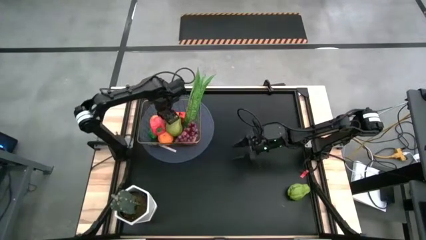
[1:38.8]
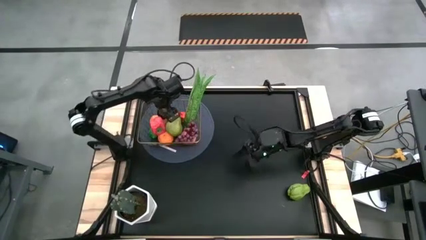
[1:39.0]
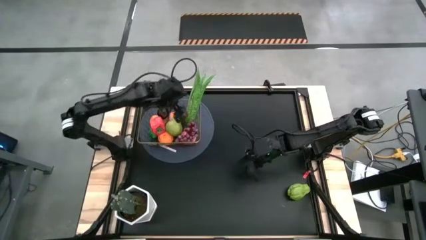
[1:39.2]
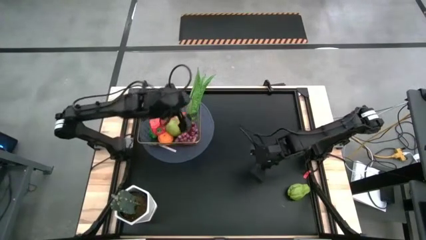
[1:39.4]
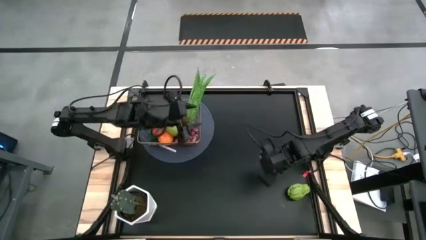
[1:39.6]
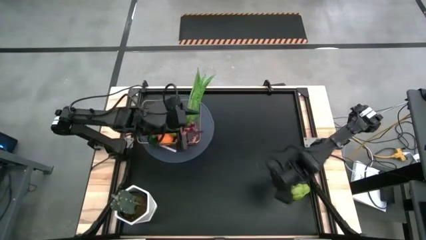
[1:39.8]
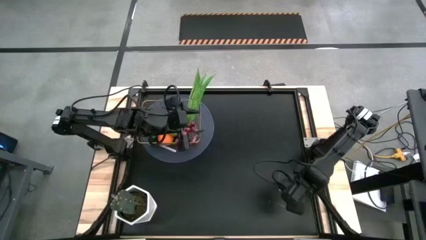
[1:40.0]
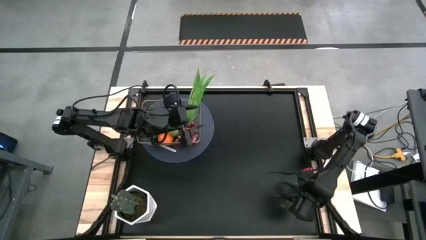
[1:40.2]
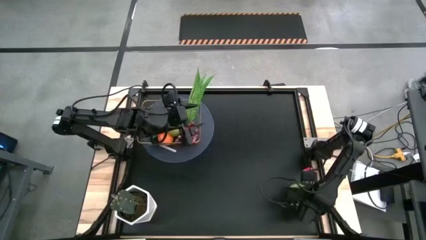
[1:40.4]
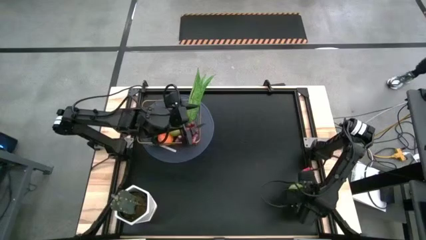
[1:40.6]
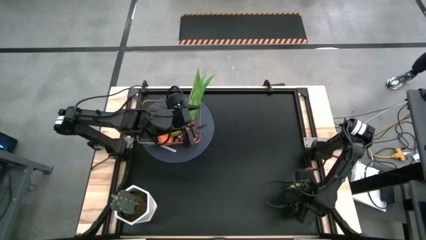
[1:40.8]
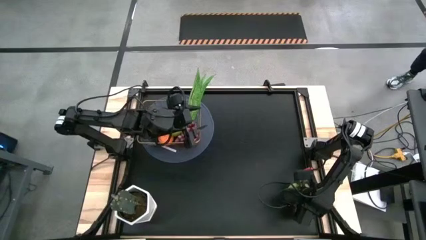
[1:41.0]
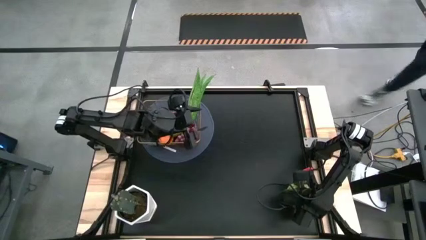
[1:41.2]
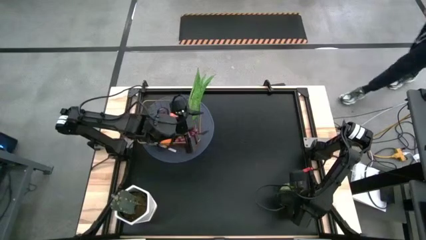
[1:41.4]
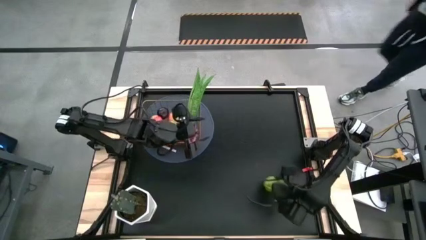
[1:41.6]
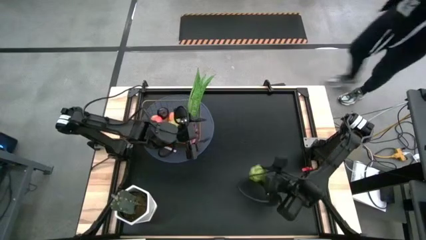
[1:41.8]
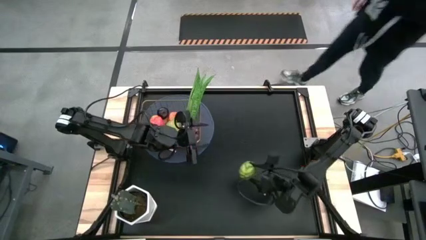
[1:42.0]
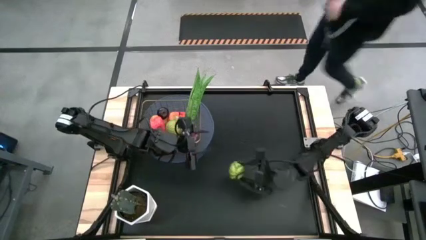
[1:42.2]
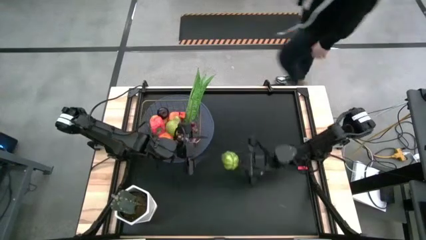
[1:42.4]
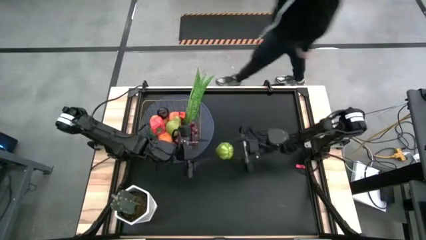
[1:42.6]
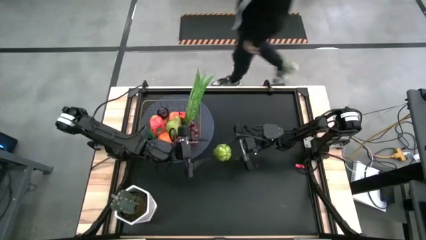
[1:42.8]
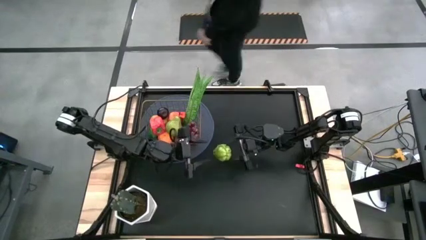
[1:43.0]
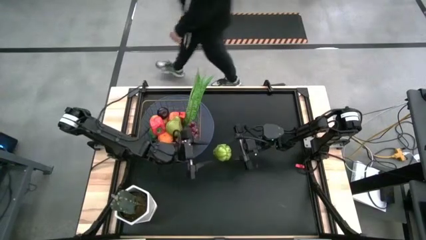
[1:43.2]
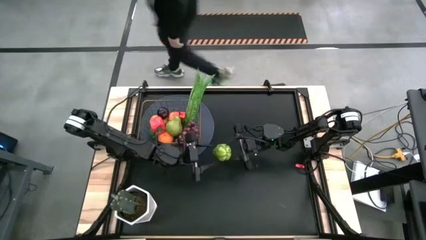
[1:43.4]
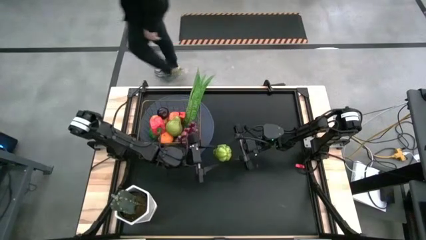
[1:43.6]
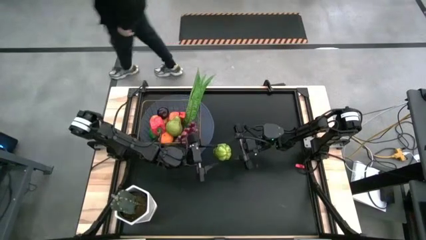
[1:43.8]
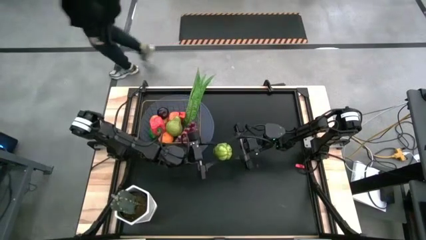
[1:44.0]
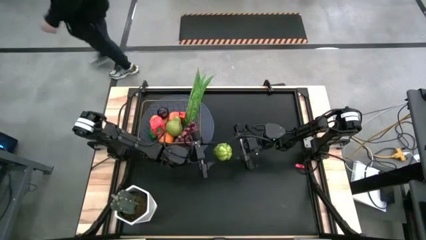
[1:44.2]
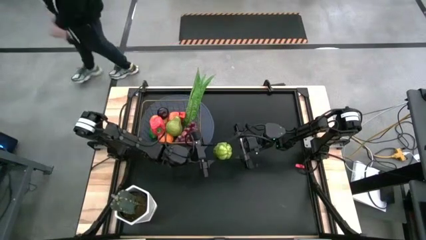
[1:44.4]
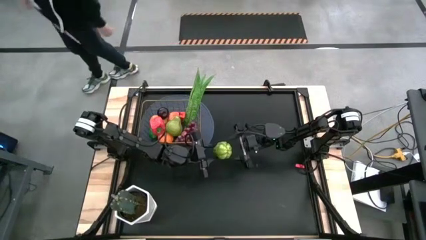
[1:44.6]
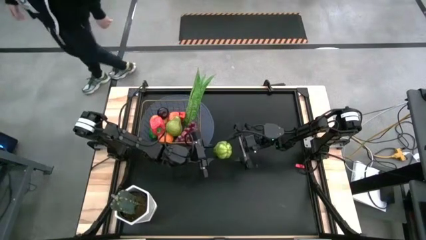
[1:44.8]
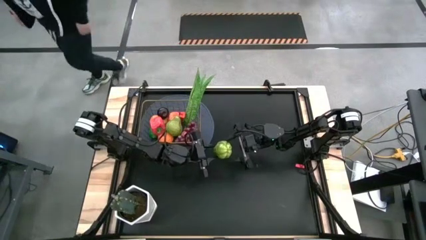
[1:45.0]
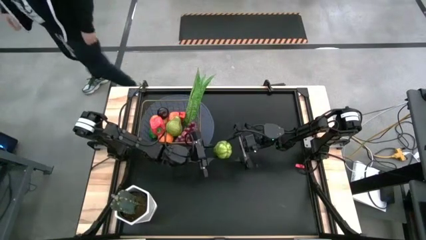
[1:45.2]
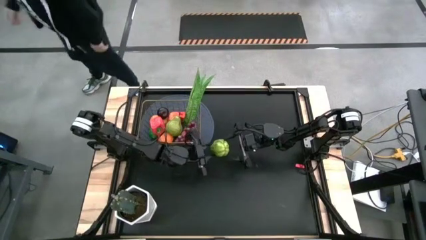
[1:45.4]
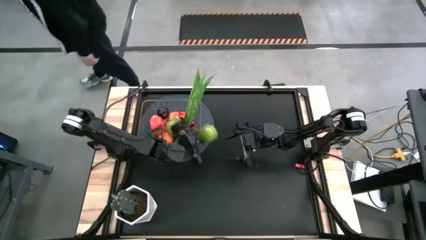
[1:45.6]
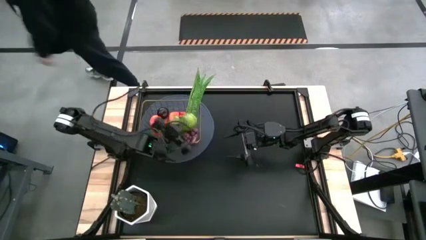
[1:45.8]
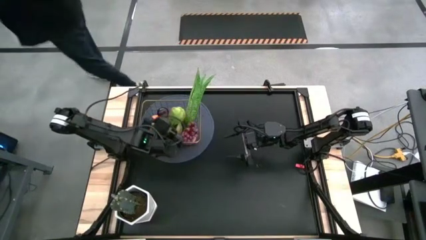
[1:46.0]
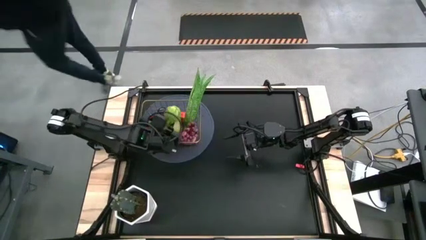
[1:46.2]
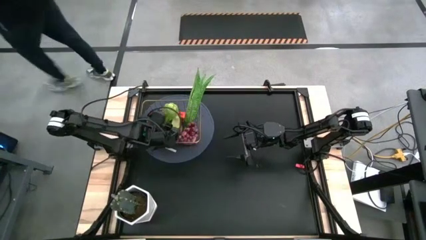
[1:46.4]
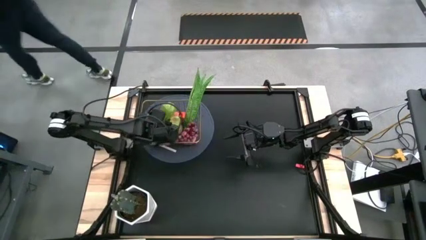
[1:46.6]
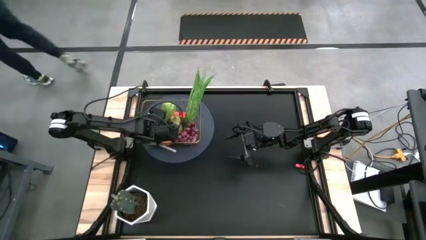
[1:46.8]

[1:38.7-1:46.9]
Task: Build produce basket
Put the green chayote into the wire basket

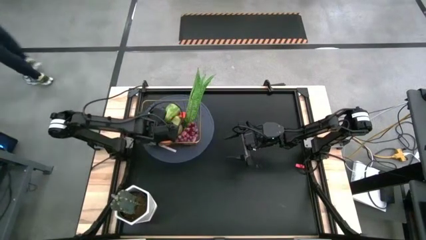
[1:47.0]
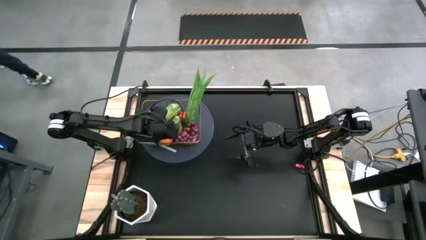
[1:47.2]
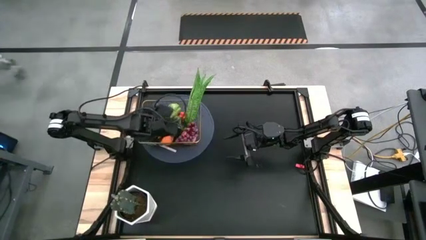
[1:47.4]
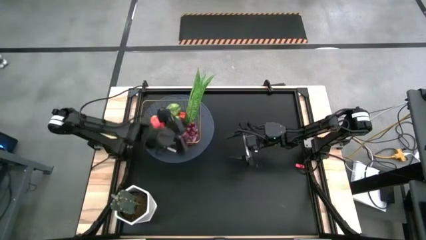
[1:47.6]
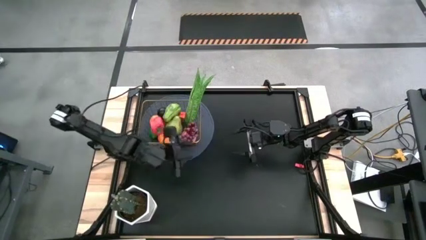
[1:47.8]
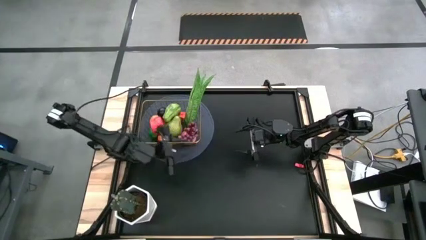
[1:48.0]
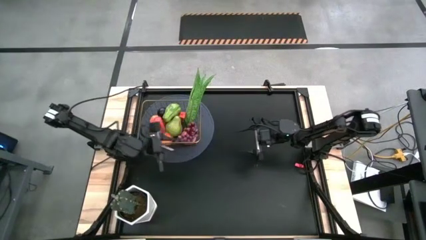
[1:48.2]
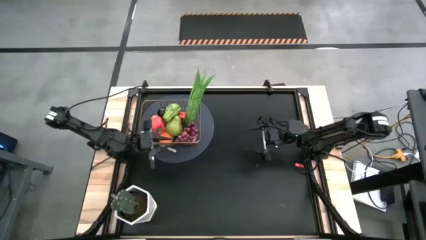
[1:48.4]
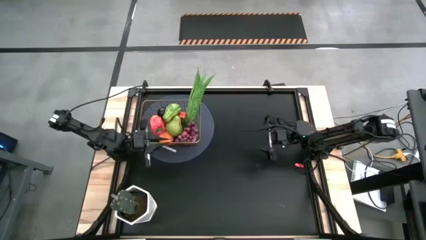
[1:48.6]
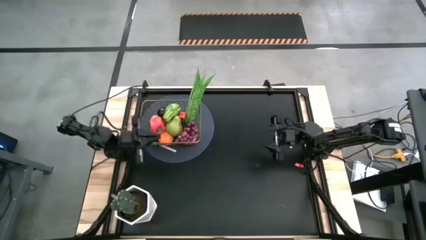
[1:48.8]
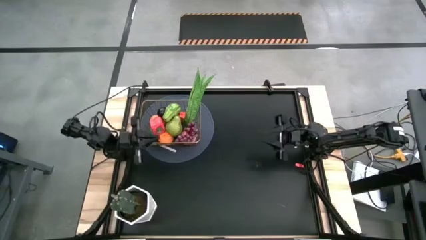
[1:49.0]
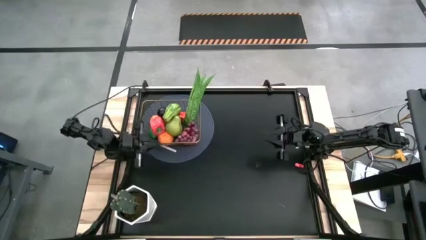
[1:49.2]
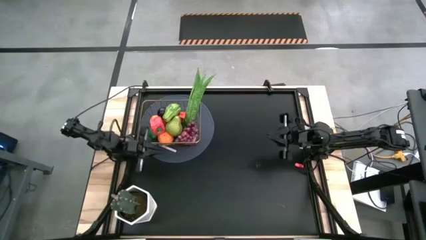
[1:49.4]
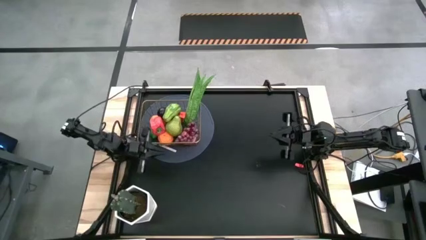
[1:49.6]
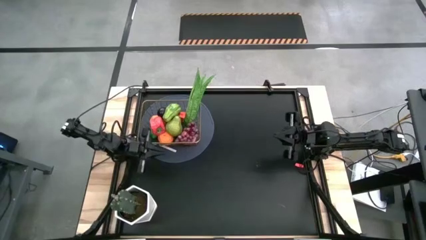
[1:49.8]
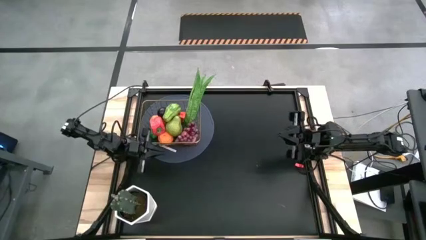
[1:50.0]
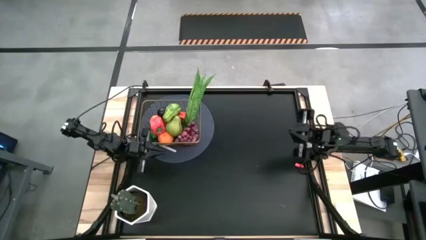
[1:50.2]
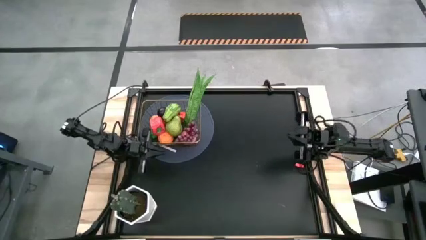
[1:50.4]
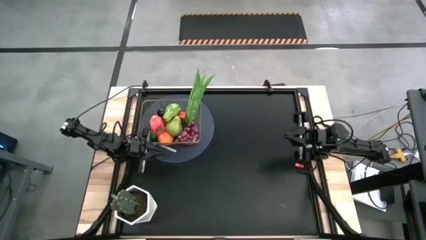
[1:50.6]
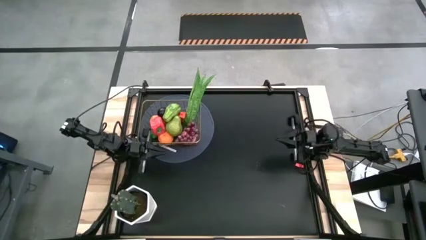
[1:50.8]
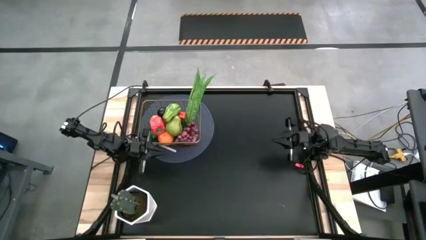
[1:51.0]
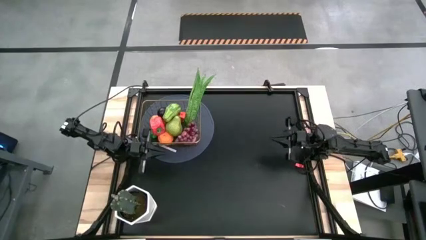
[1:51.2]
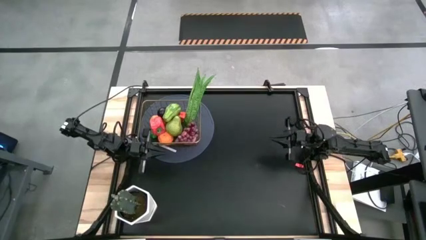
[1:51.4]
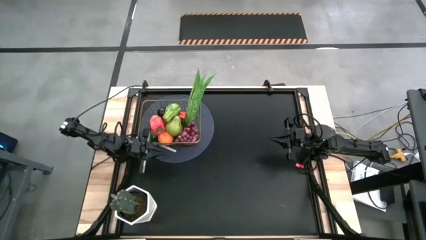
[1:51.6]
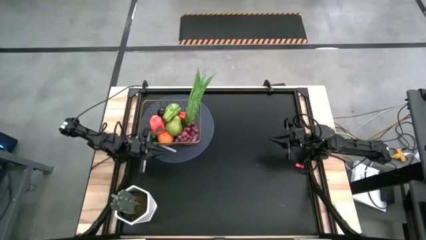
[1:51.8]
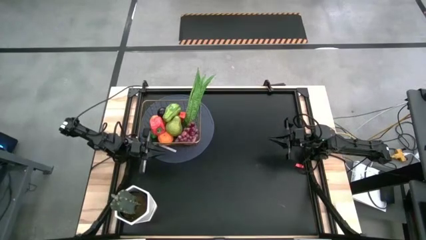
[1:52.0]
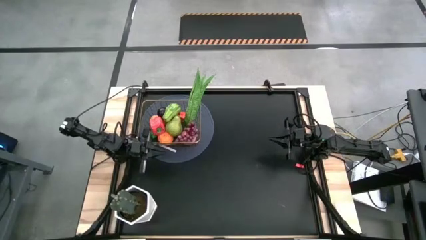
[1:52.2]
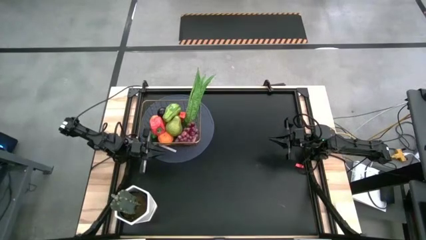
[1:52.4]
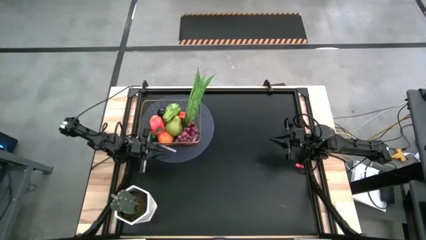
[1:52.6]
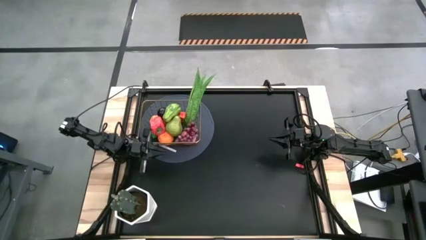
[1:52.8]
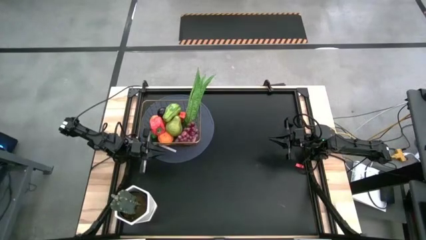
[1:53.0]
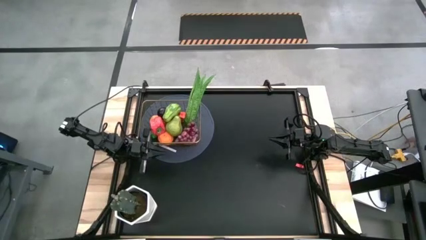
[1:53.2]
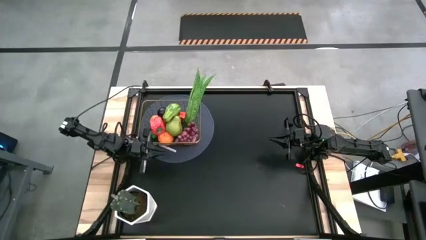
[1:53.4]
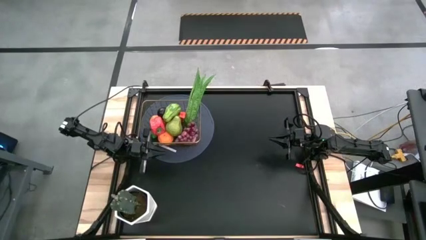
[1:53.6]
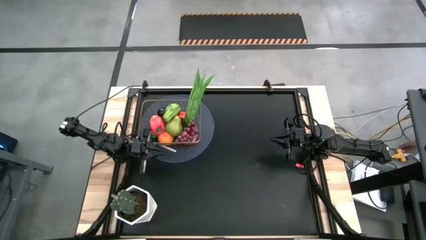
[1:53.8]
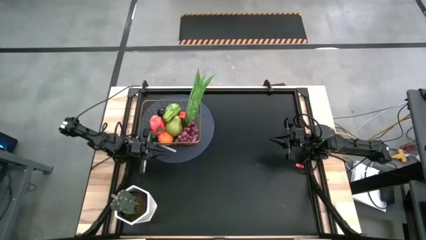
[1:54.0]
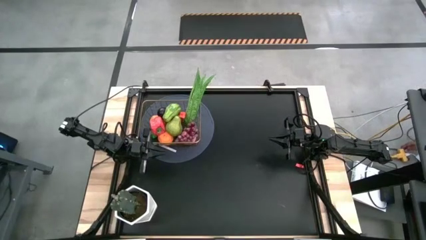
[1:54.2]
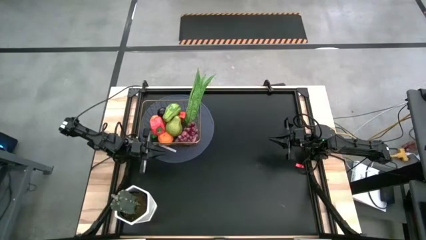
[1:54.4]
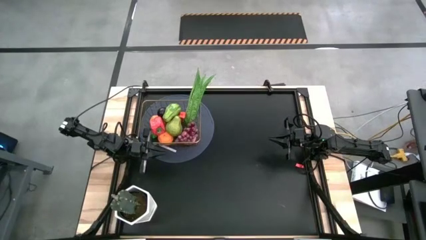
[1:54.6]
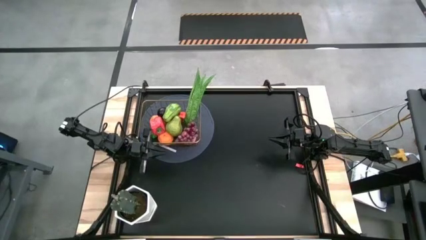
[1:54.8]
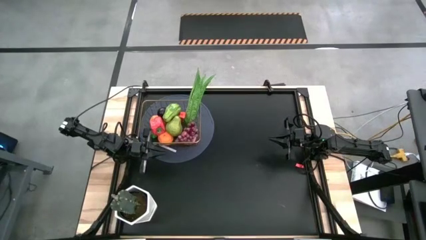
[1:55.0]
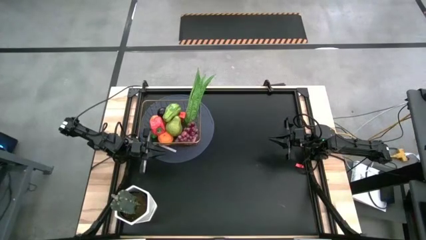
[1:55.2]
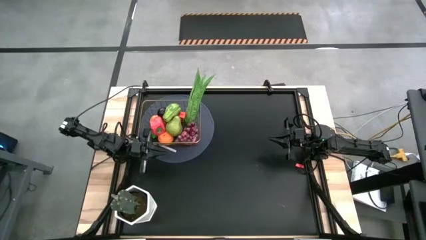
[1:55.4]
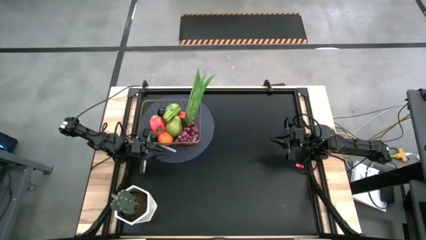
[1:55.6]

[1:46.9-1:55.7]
Return to Home Position
